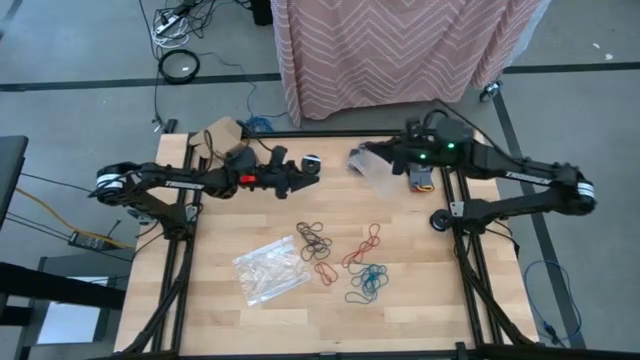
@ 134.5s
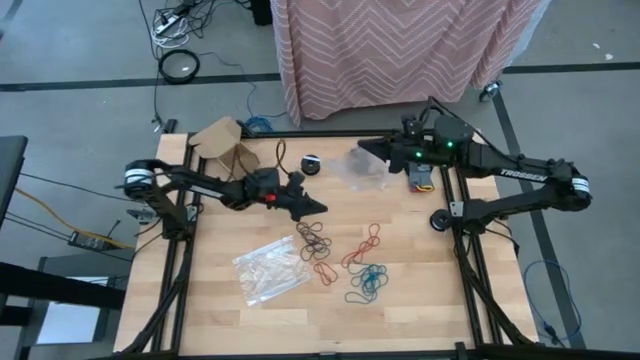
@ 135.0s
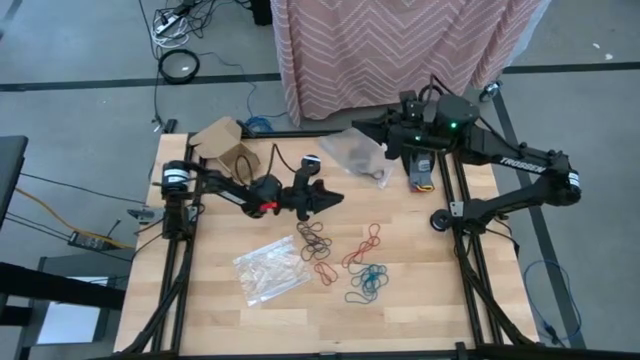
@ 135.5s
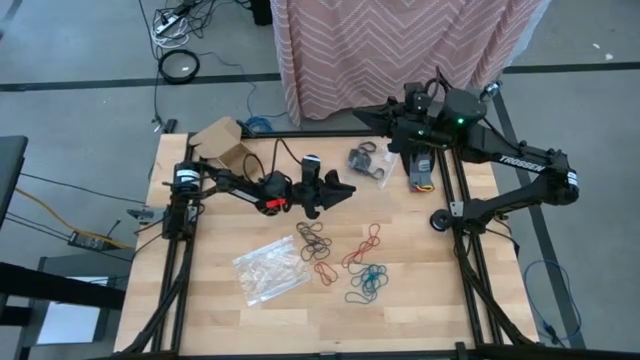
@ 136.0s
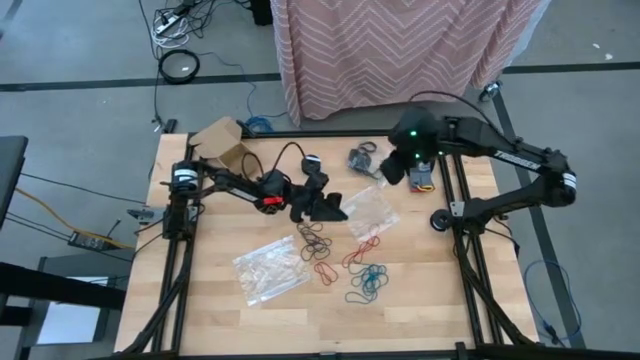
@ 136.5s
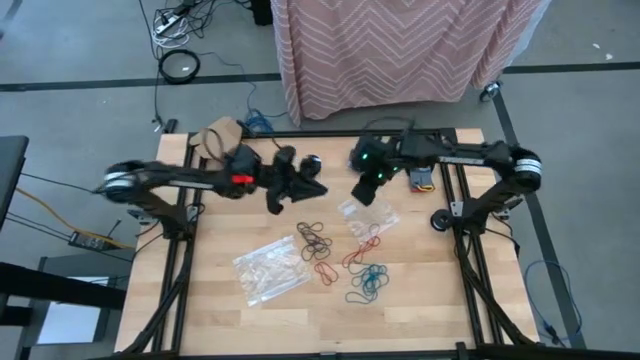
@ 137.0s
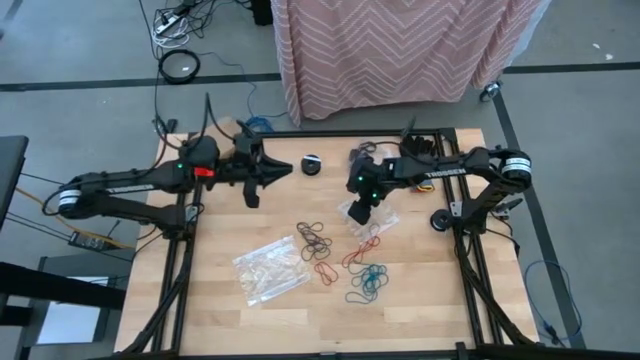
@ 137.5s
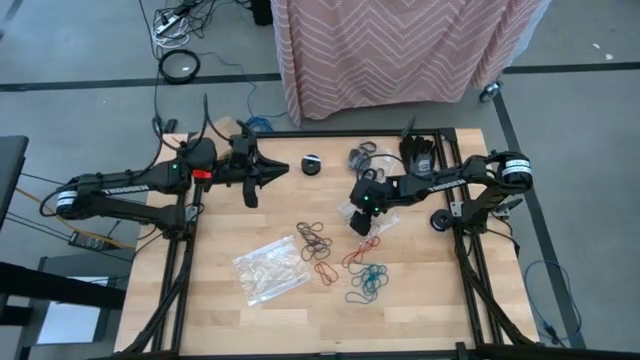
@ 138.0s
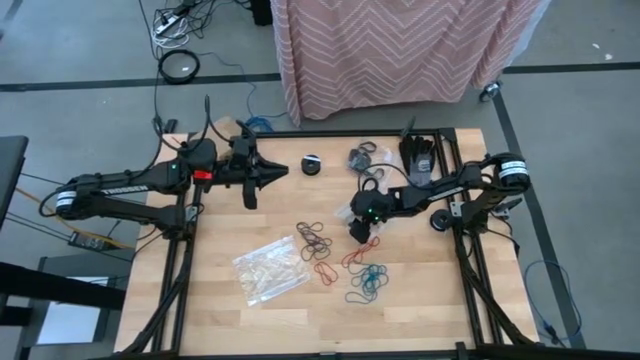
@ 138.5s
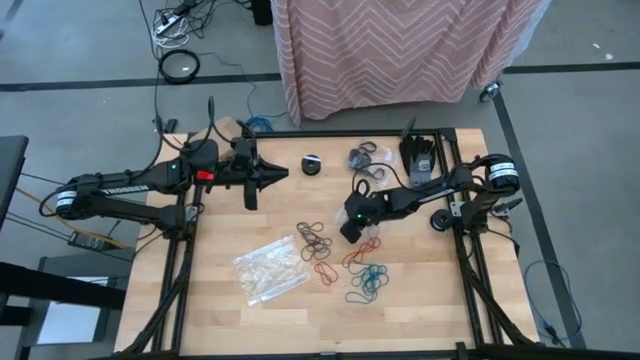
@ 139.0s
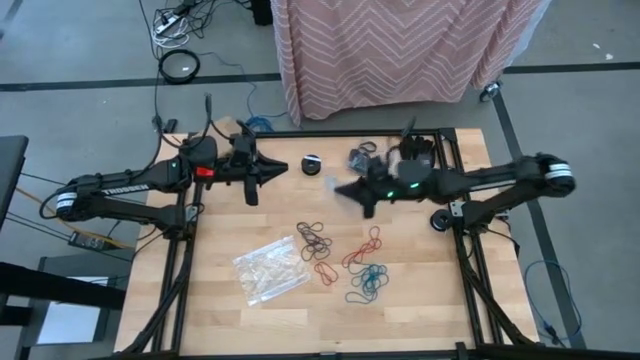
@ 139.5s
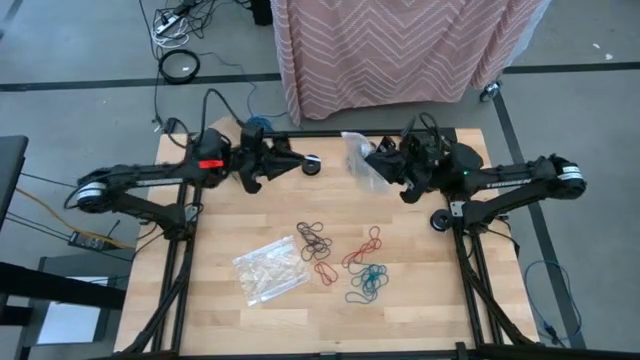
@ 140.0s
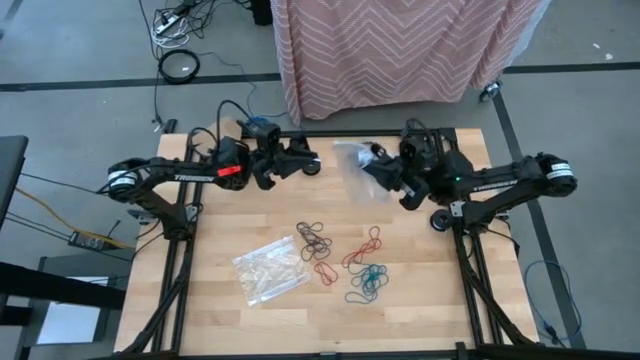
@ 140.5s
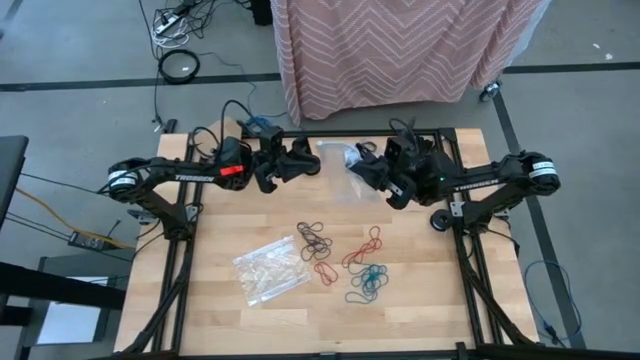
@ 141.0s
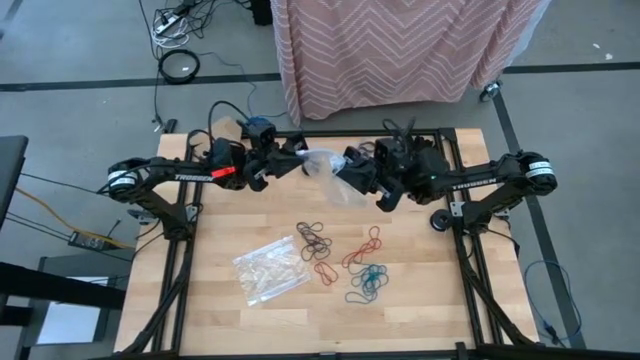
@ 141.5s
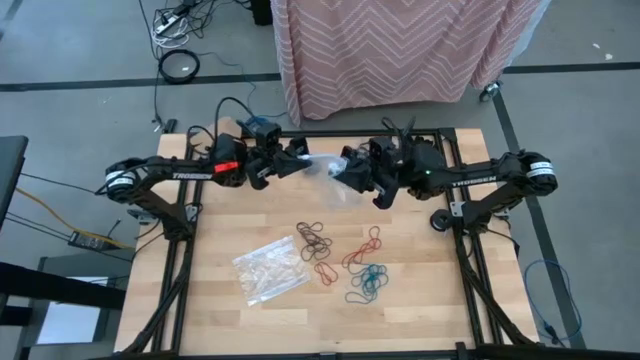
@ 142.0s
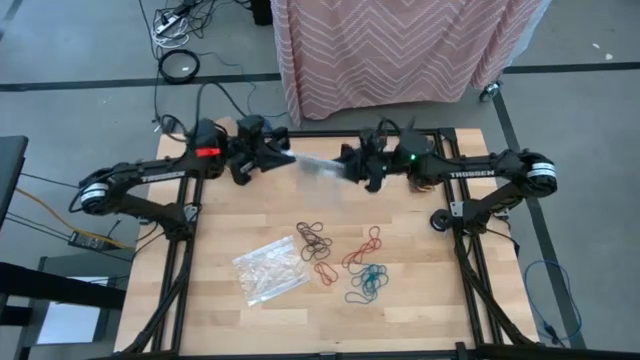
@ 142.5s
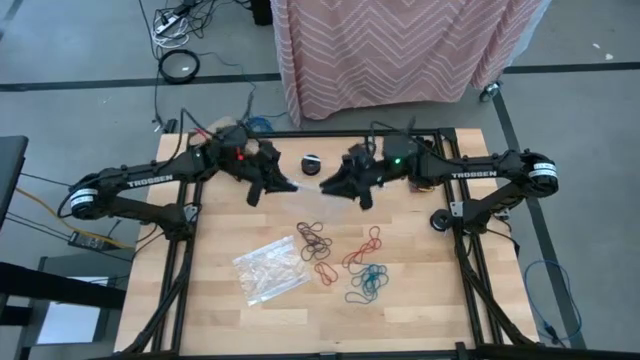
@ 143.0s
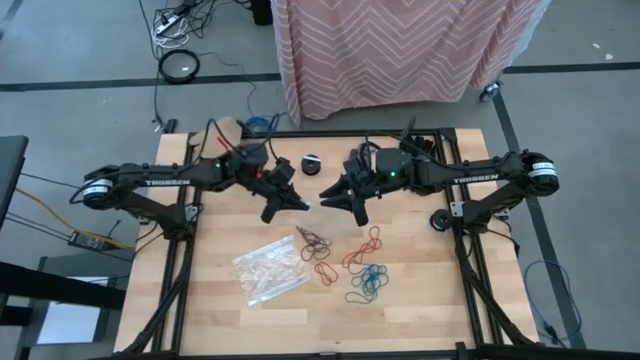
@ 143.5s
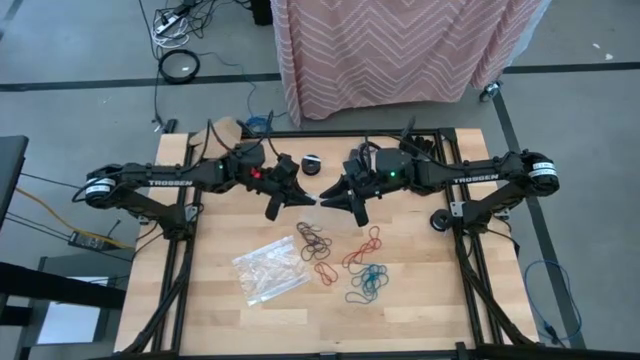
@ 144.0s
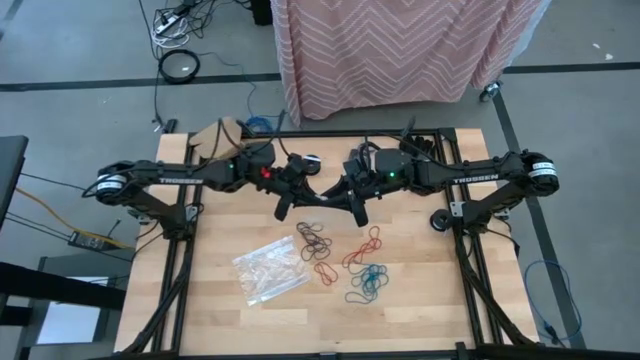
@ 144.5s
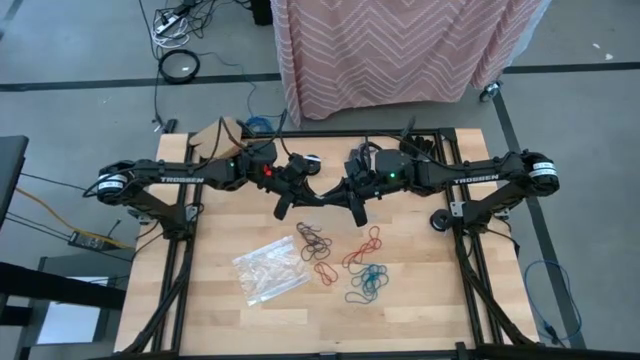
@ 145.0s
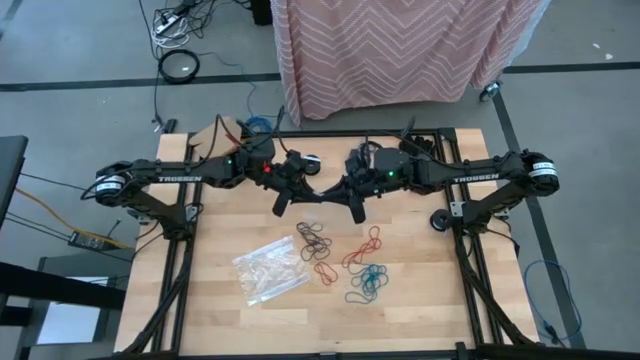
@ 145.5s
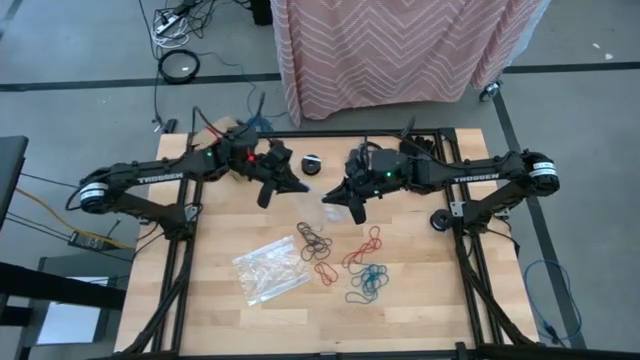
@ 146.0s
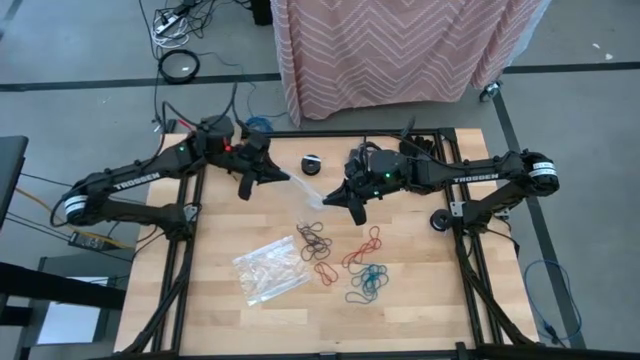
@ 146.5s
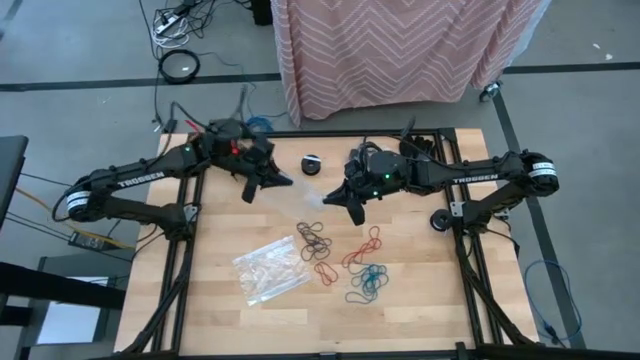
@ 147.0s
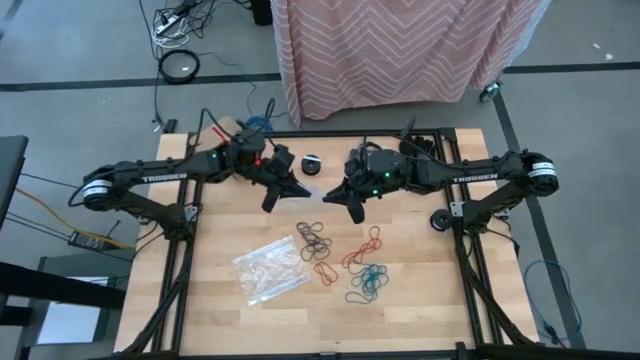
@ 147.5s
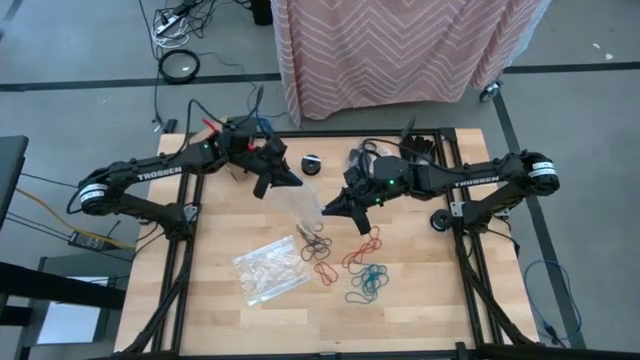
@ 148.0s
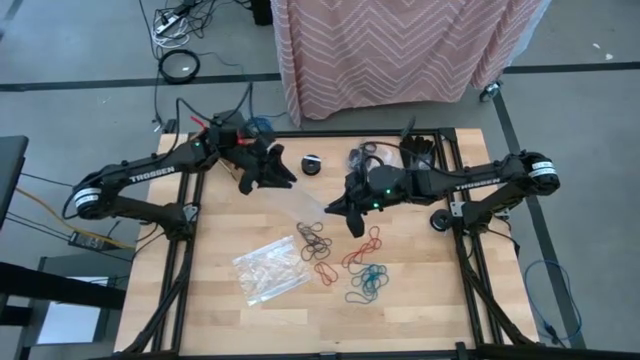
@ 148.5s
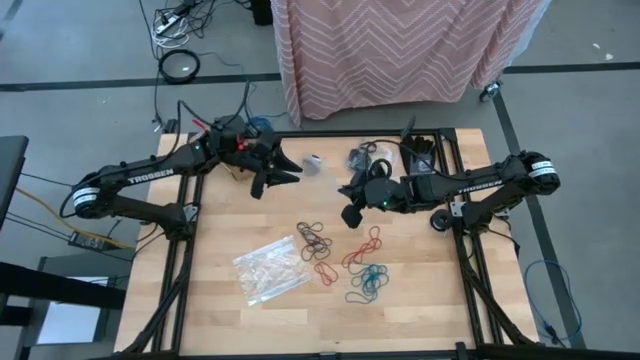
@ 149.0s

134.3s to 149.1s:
Task: Sort rubber bands
Open the transparent zip bag

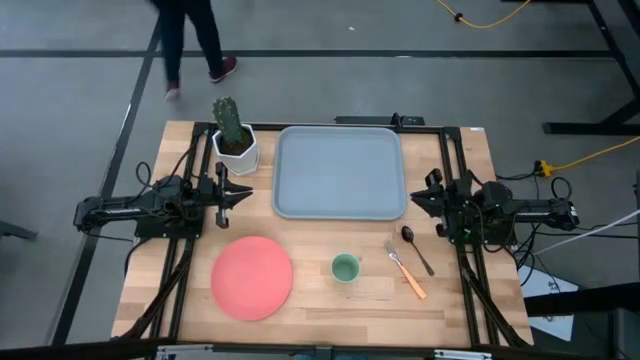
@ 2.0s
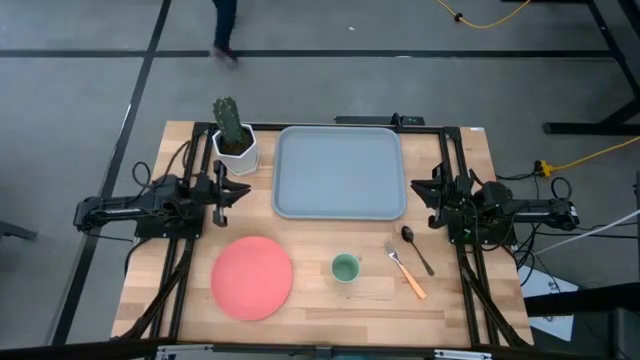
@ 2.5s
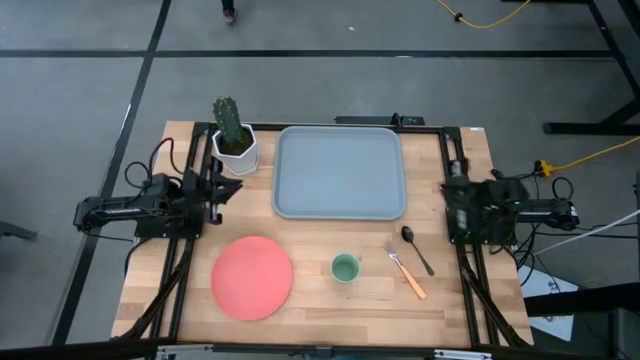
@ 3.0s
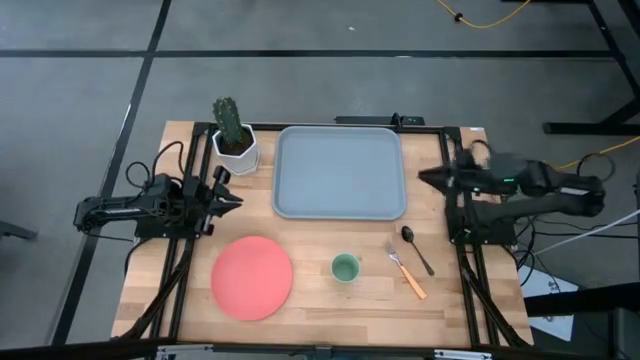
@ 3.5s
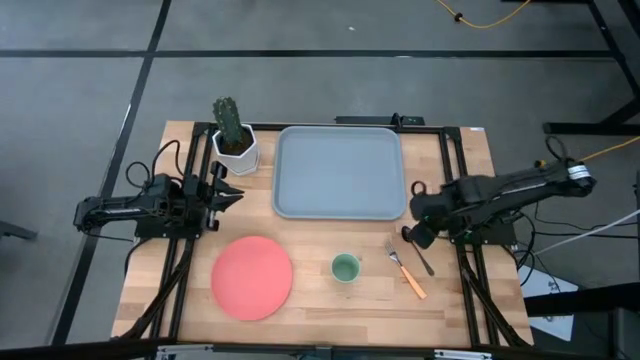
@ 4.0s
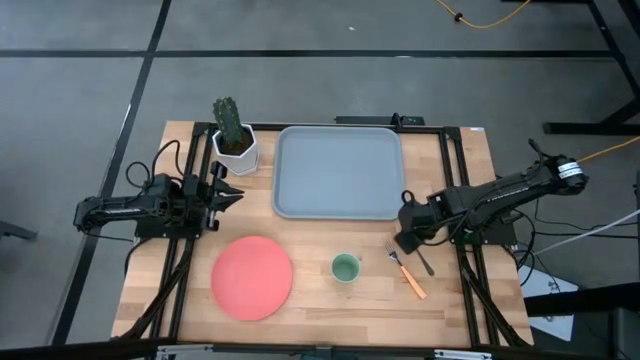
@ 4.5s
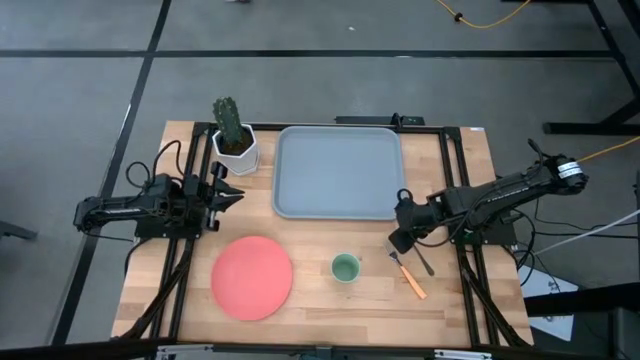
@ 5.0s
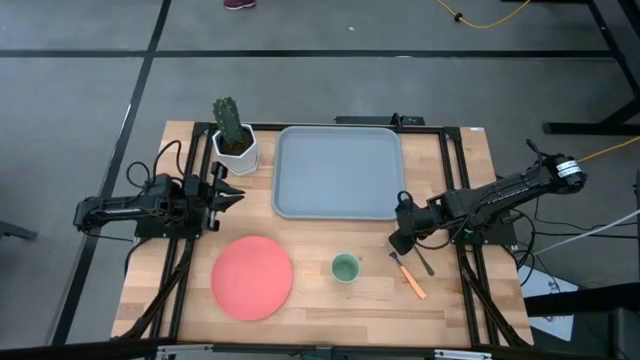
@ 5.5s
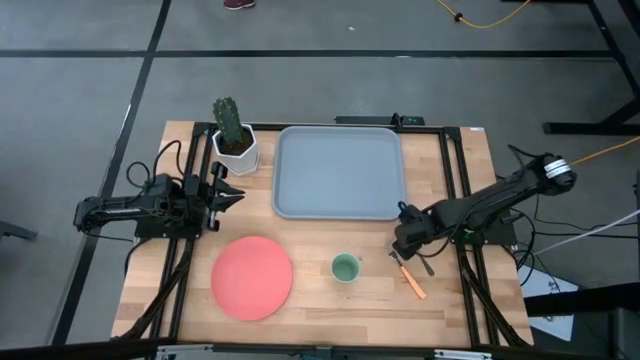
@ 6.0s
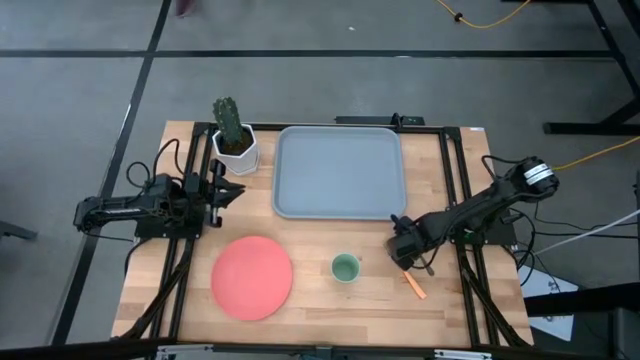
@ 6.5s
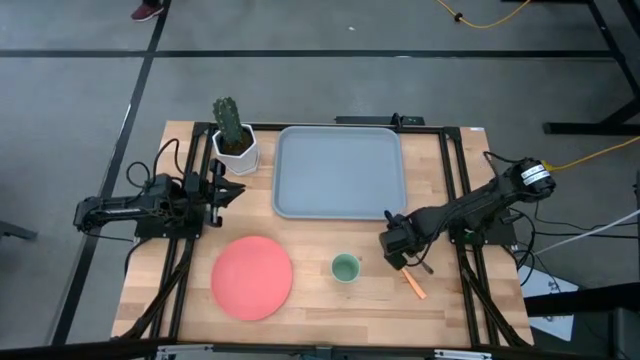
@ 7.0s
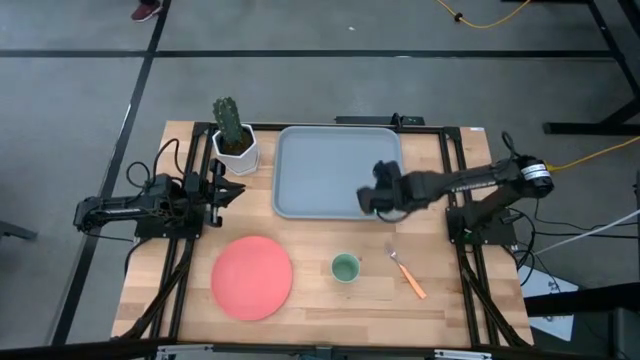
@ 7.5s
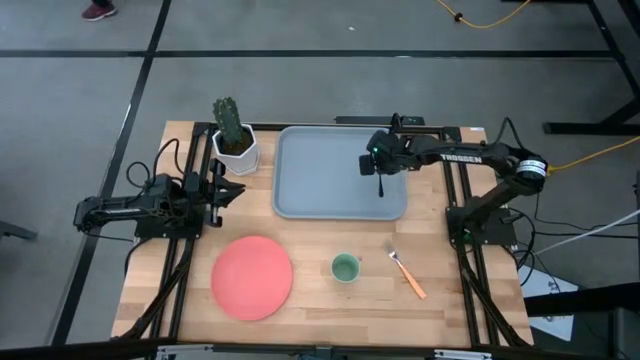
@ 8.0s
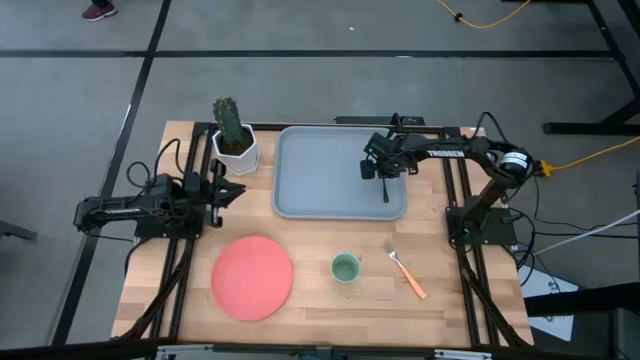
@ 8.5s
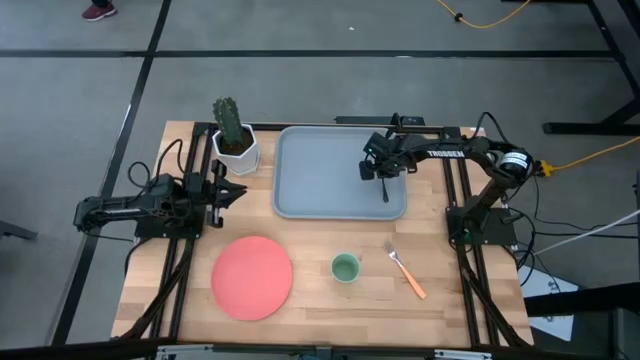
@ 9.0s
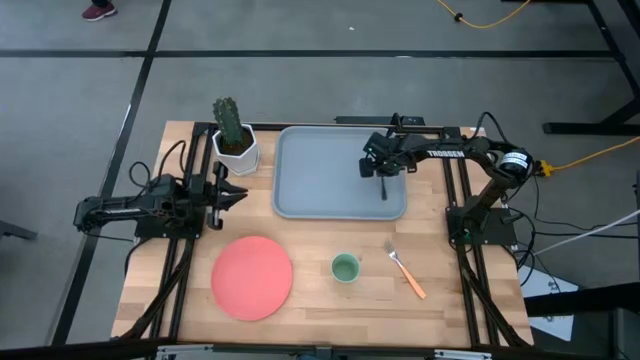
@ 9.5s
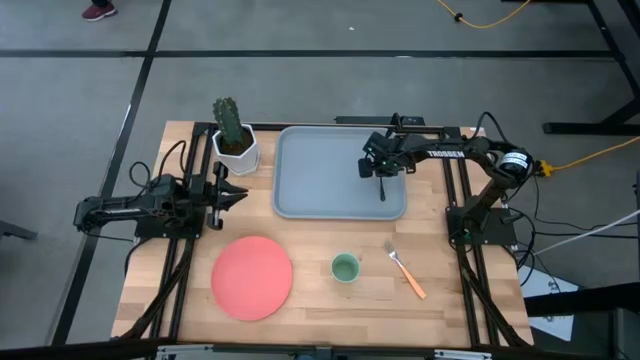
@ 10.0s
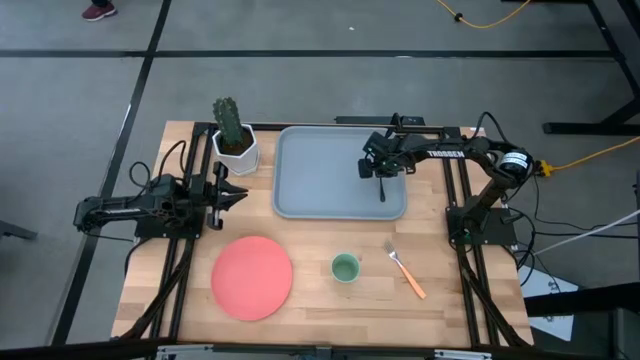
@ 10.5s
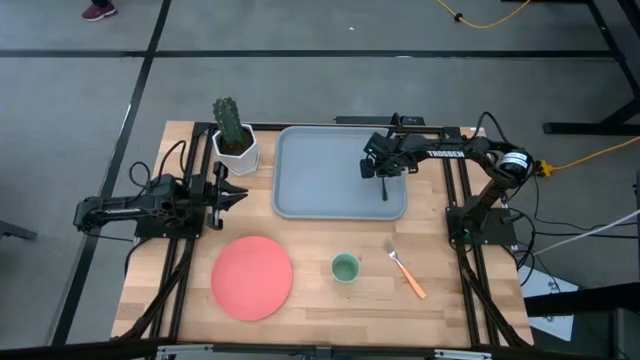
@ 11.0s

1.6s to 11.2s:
Task: Pick and place plate/cup/fork/spoon on tray
Put the black spoon on the gray serving tray
